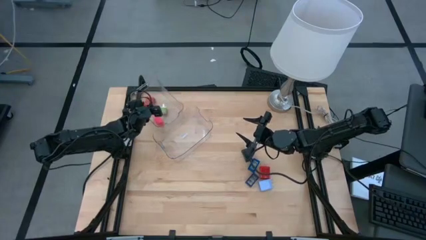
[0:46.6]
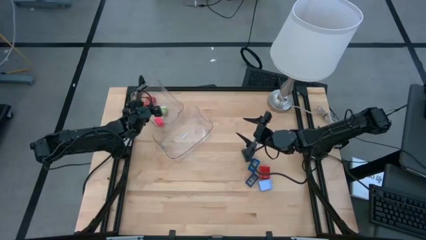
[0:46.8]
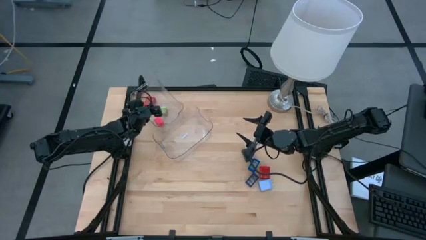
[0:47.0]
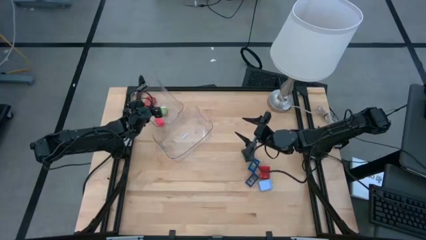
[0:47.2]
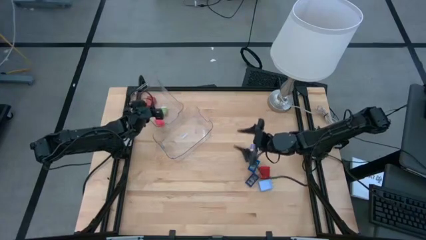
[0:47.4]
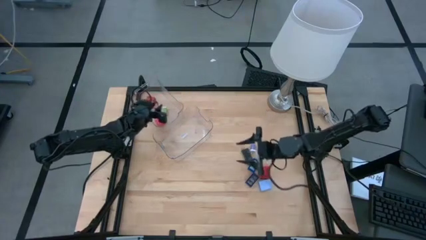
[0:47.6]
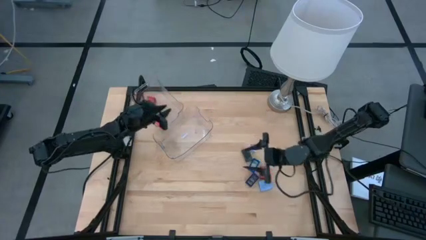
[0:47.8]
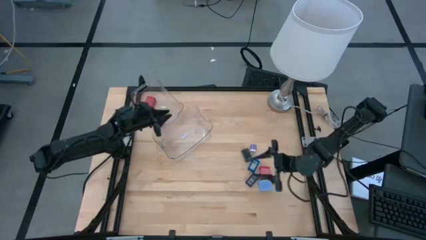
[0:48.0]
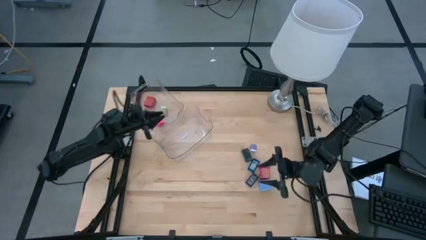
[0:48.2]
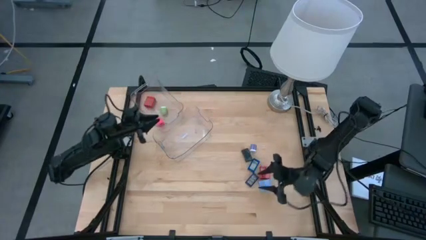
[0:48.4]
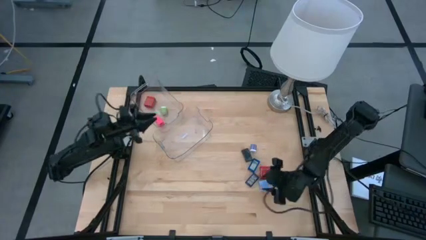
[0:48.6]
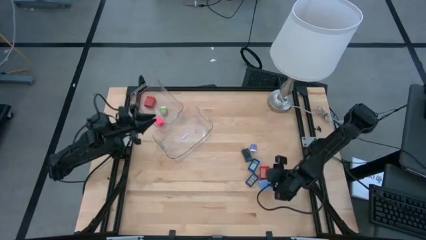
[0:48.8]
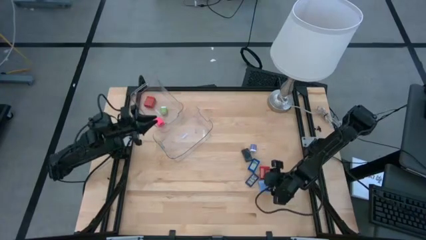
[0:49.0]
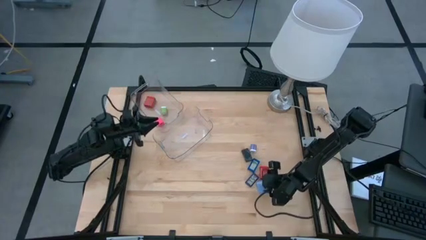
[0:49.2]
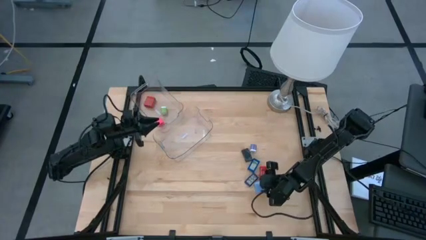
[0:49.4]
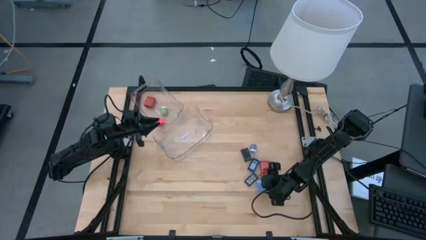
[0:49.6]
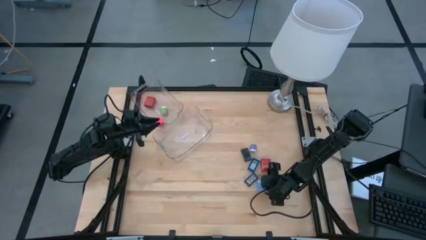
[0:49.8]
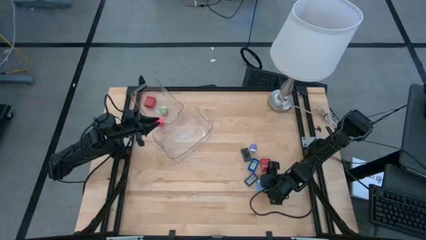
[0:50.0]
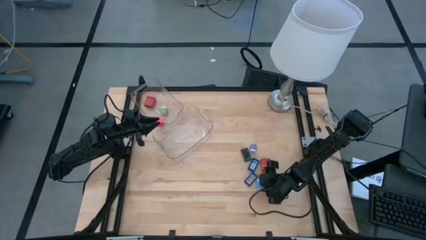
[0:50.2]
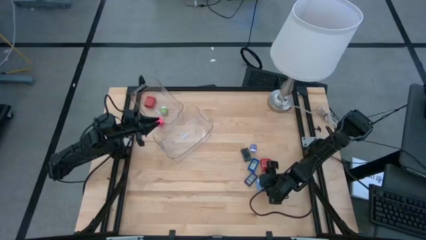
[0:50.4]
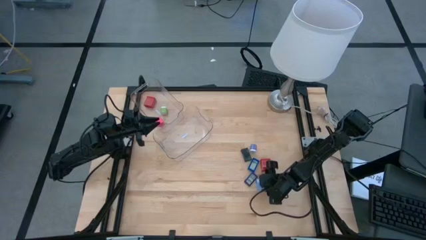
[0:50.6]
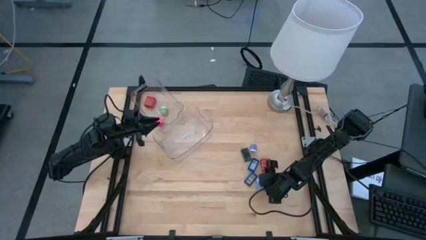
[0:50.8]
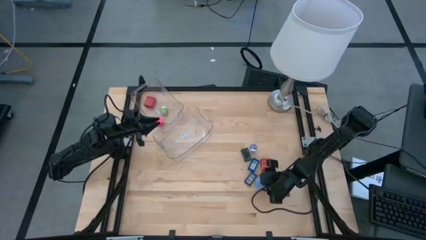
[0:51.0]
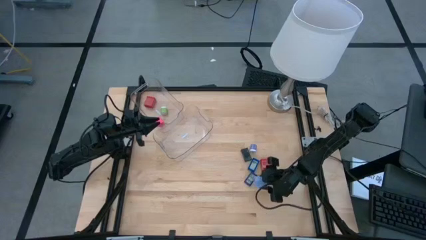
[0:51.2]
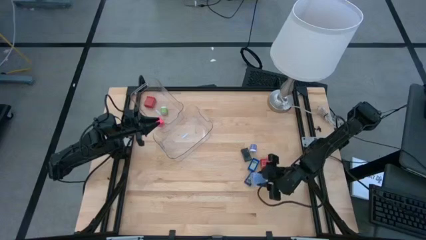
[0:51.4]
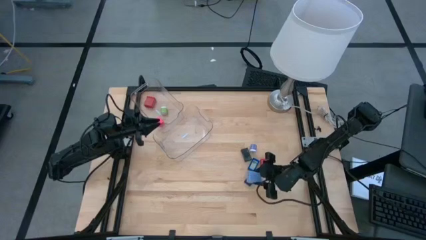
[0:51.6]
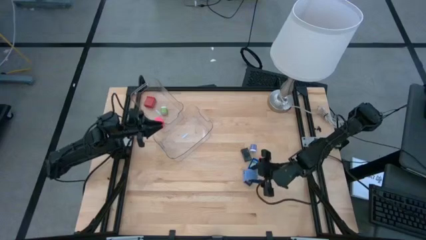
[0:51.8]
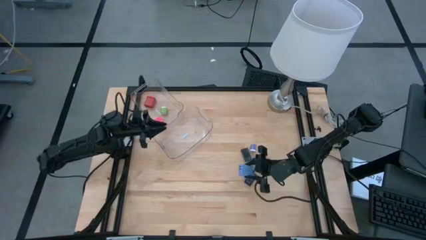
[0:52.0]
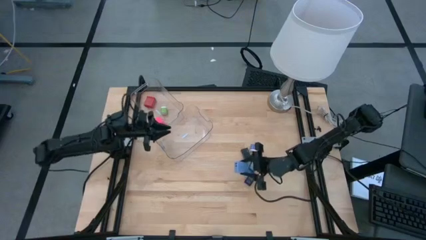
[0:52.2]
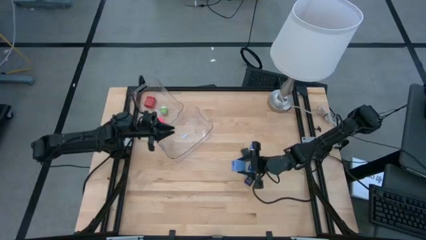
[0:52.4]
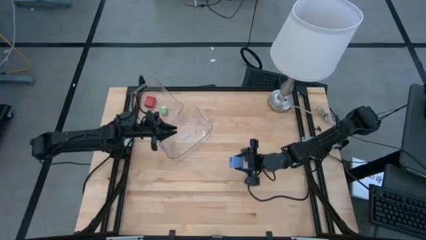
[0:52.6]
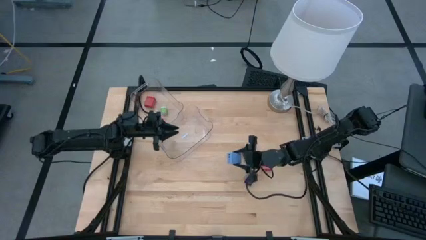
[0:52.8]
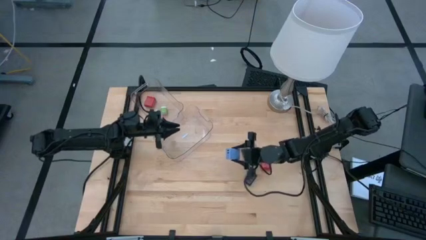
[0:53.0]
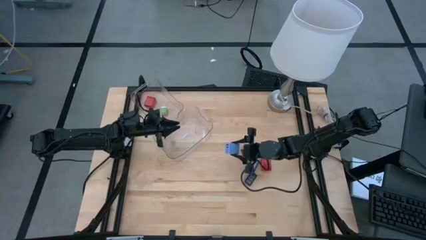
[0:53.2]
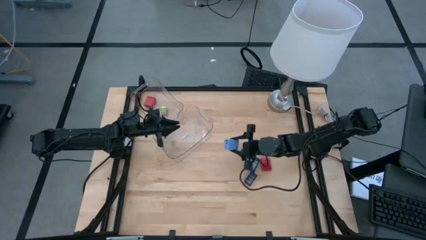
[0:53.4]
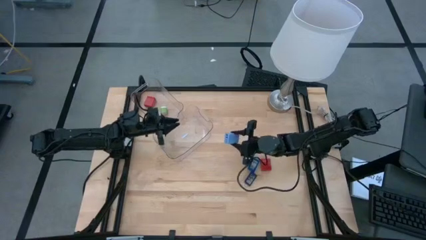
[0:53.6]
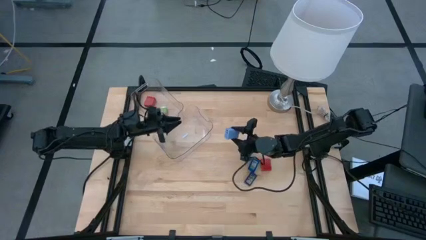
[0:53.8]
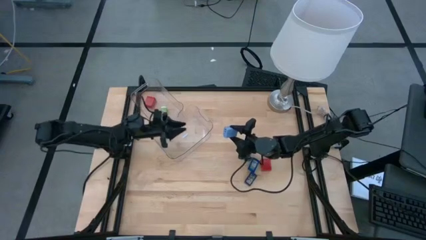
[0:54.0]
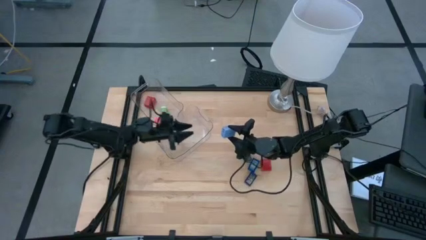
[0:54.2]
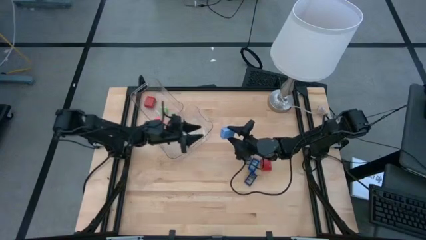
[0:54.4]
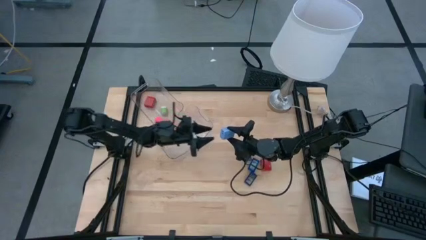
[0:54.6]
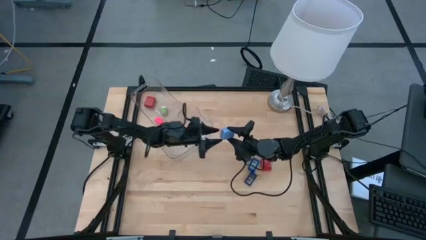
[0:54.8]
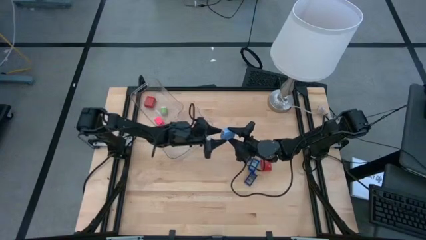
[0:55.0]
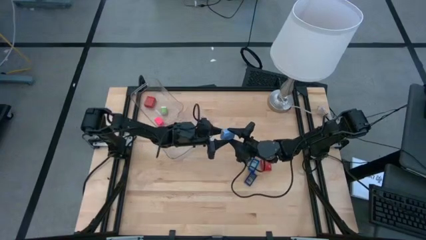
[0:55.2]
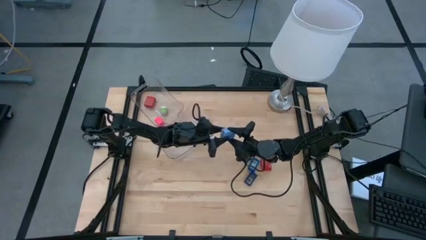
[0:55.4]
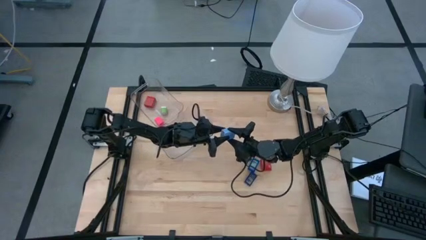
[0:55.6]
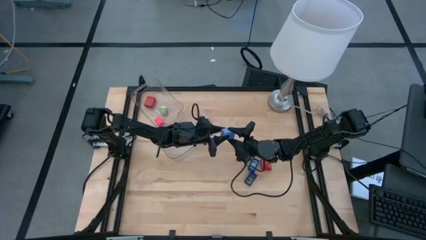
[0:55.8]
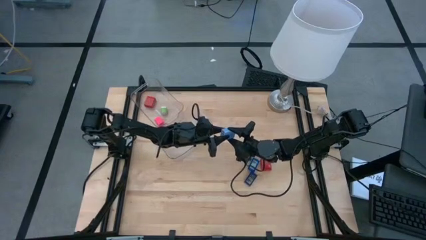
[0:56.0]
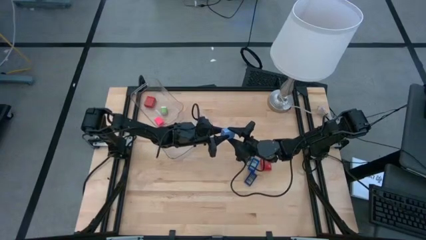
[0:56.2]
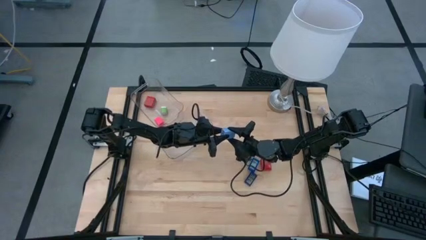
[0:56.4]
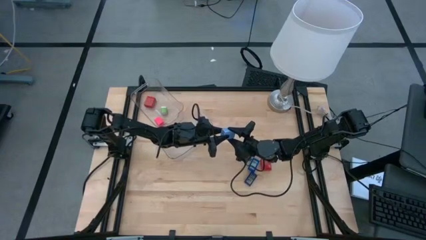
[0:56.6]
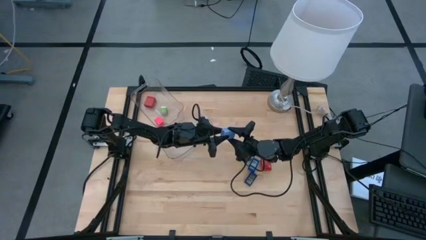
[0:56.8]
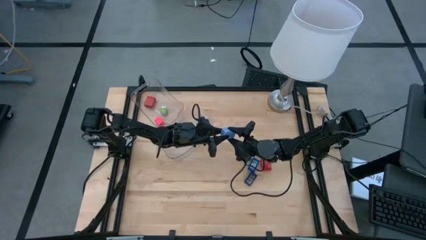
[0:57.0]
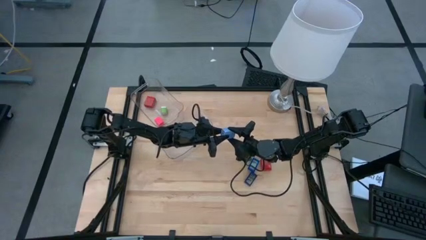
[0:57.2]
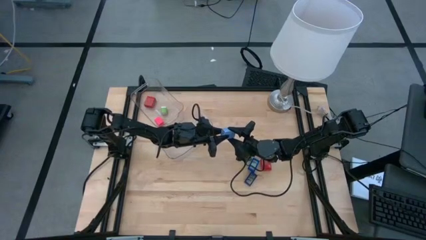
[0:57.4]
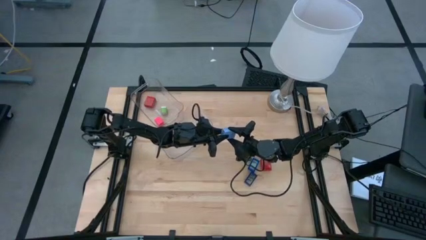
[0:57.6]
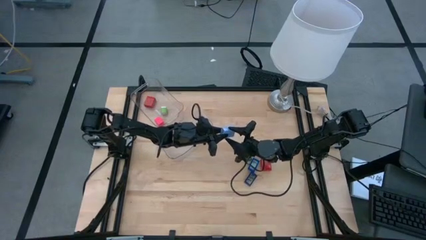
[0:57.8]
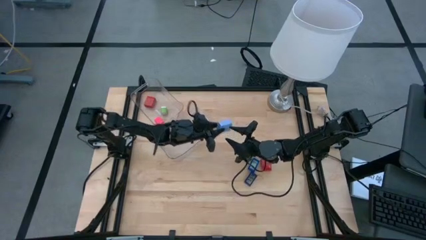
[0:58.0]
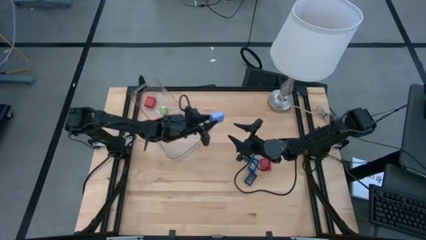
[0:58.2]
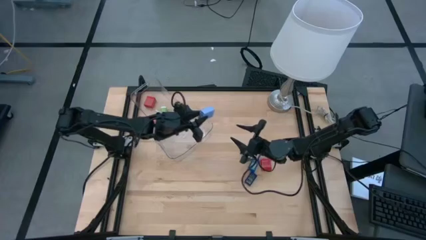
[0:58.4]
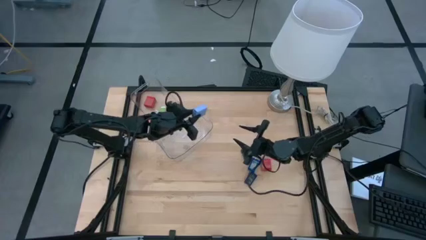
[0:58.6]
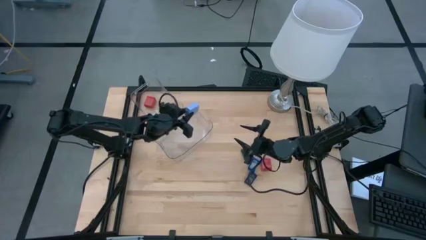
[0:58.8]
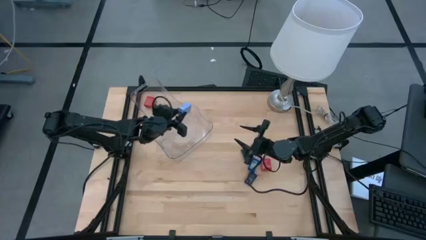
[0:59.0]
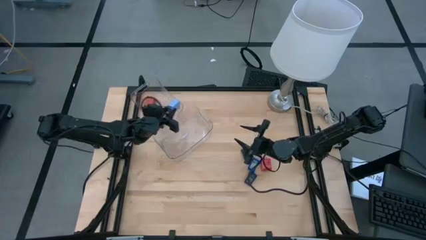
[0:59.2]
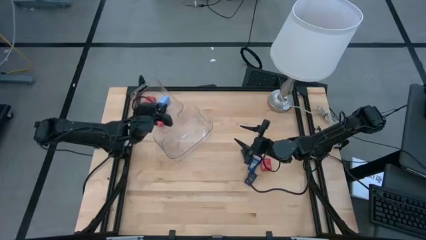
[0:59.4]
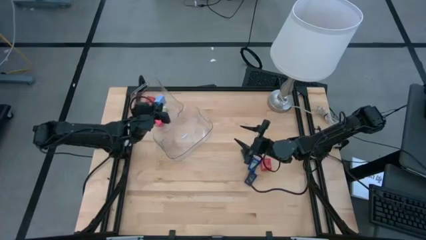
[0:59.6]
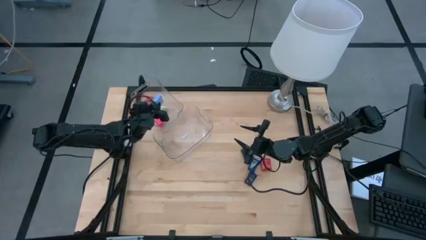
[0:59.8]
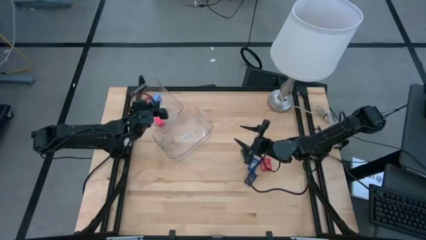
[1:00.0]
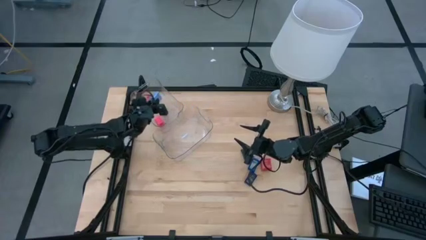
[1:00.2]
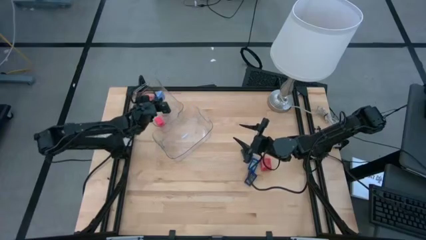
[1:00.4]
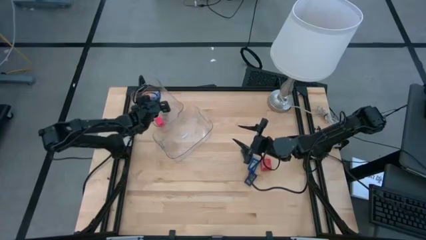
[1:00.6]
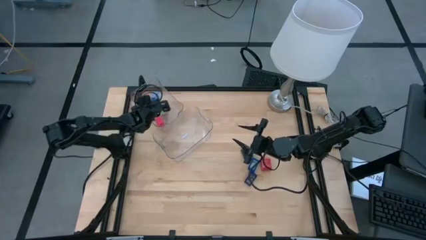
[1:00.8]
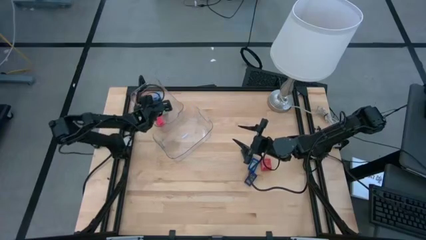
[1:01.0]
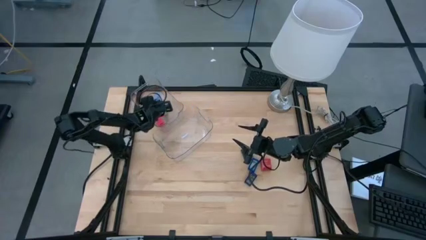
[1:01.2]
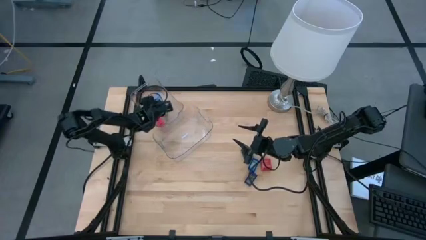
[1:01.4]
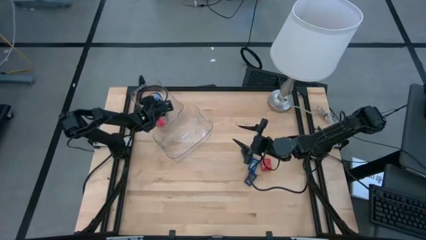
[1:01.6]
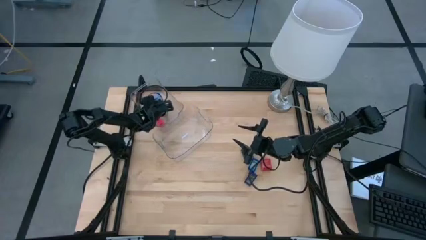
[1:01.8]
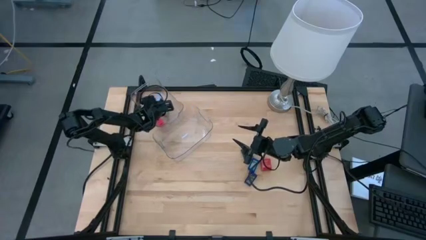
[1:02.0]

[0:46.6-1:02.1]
Task: Pick & Place Office items
Put the light blue charger adapter into the top transparent bin

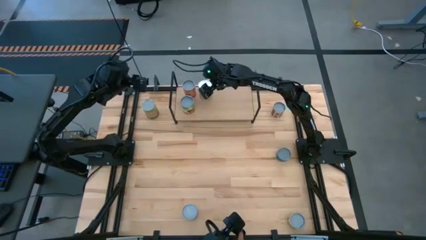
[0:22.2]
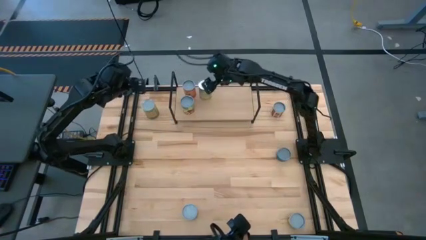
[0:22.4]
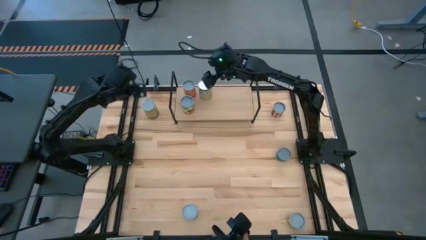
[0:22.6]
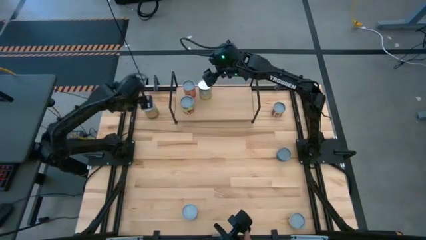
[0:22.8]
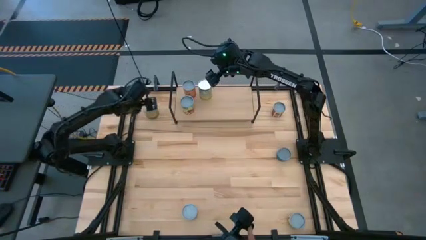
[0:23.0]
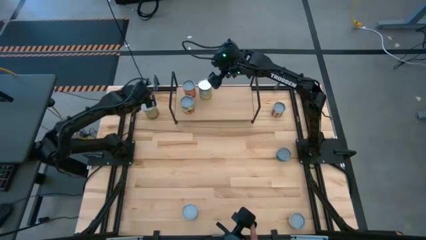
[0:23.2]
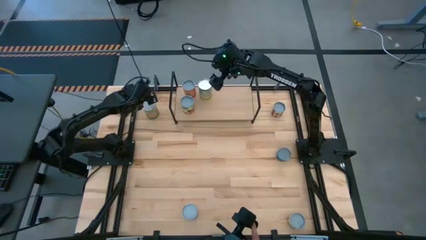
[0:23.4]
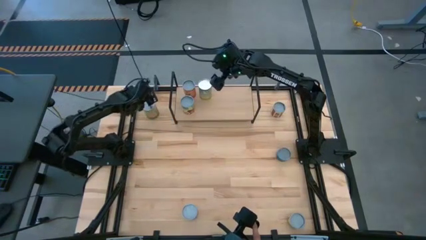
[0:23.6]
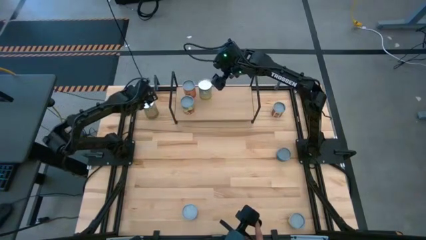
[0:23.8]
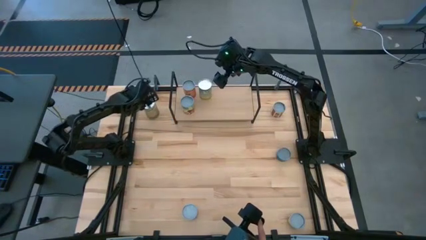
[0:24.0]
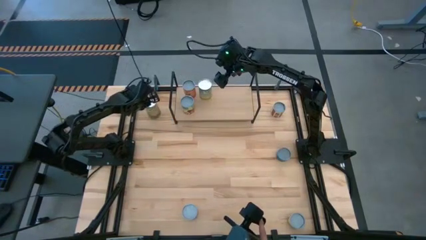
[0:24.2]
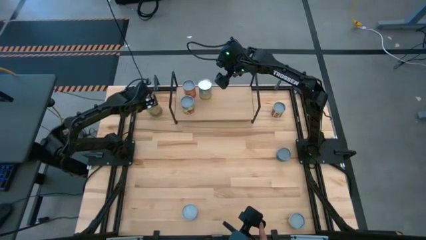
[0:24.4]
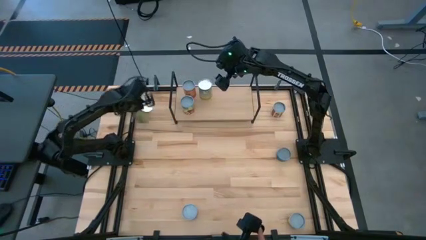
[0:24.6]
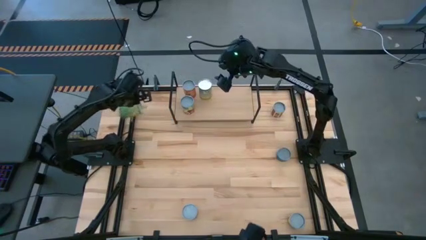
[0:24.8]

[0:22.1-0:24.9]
Task: Pick and place cans onto a shelf
Put the canned oranges on the shelf
